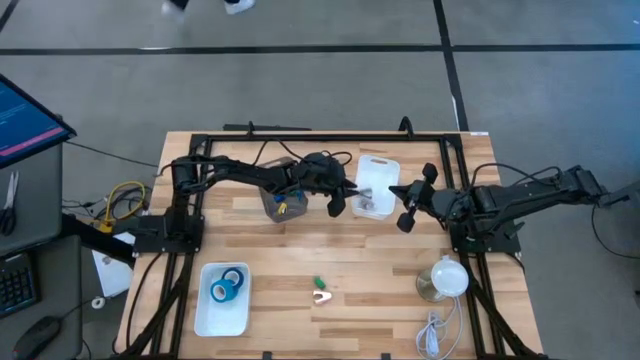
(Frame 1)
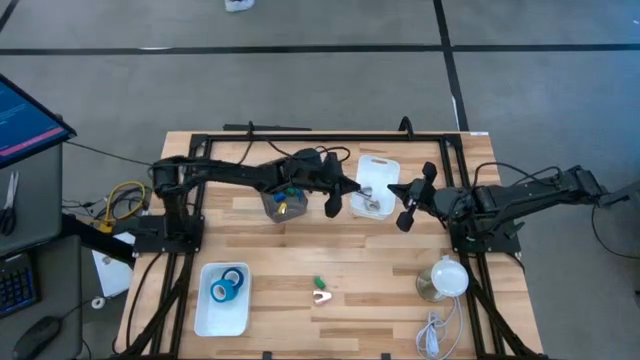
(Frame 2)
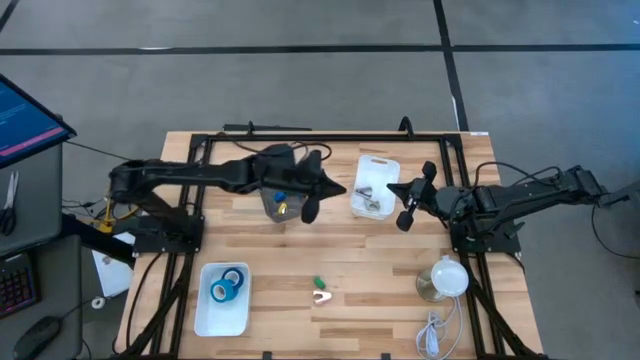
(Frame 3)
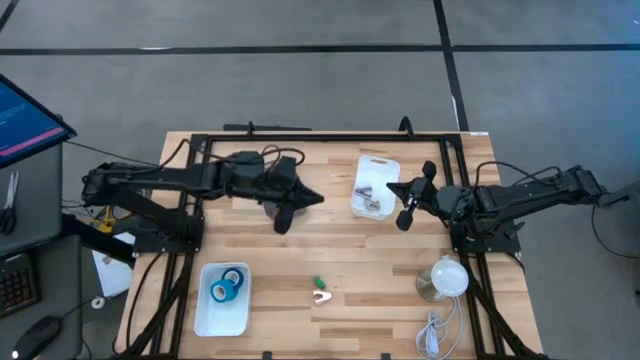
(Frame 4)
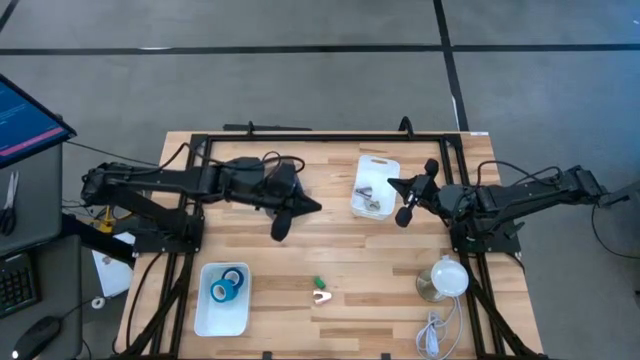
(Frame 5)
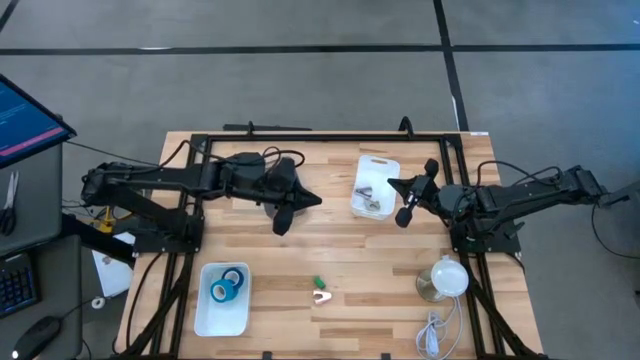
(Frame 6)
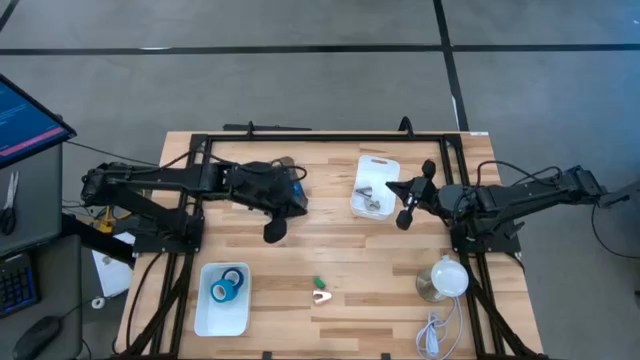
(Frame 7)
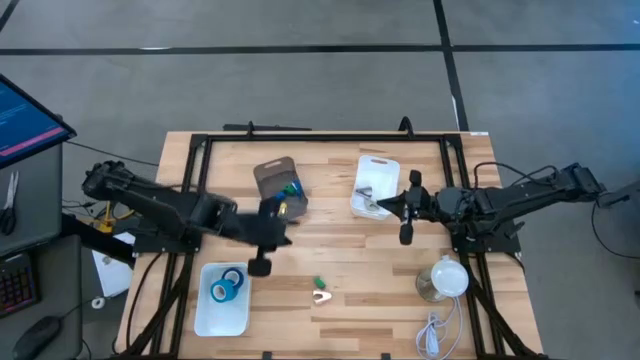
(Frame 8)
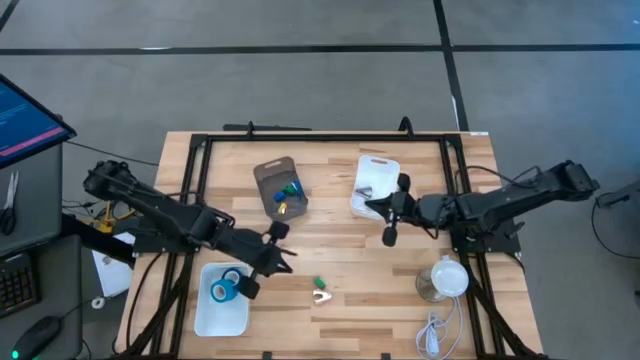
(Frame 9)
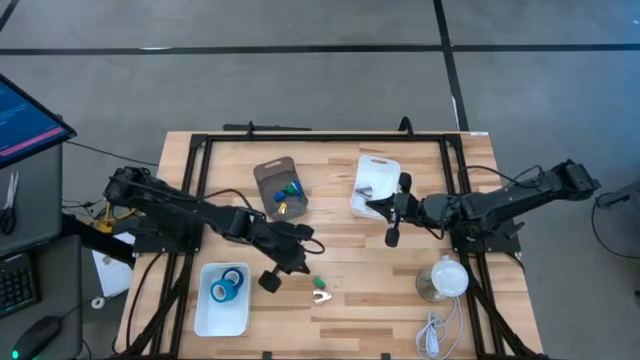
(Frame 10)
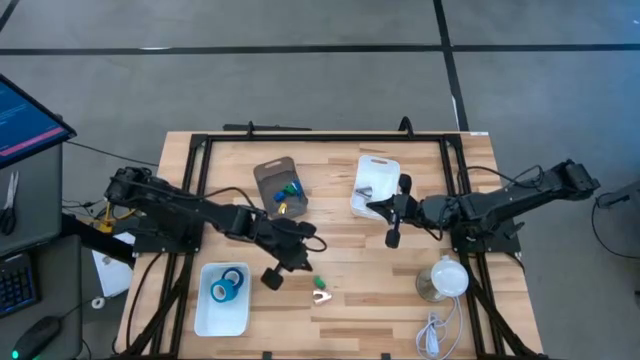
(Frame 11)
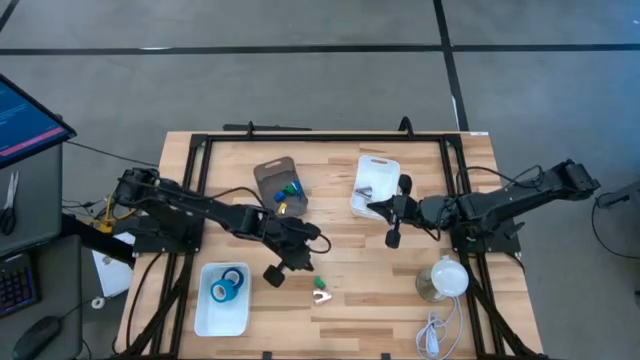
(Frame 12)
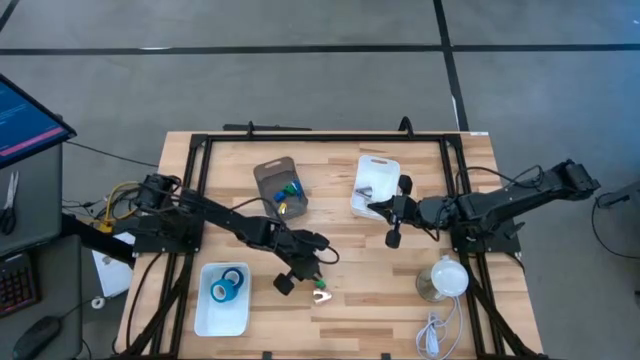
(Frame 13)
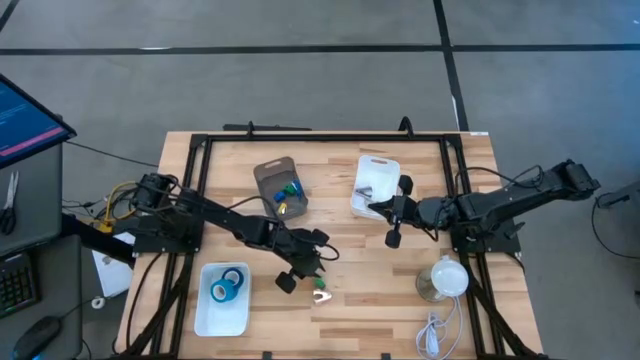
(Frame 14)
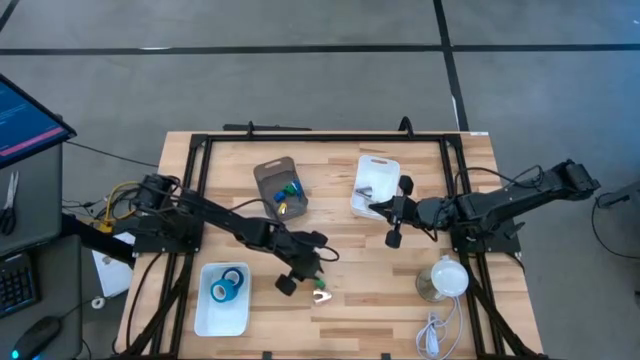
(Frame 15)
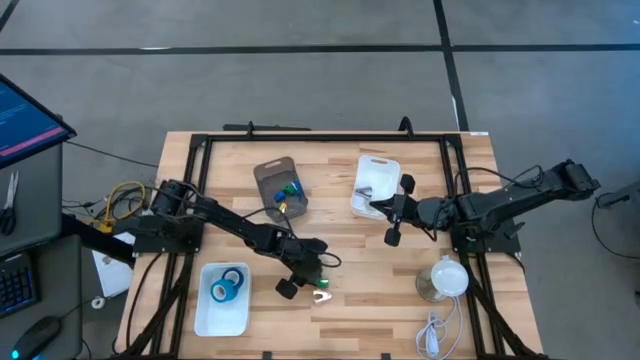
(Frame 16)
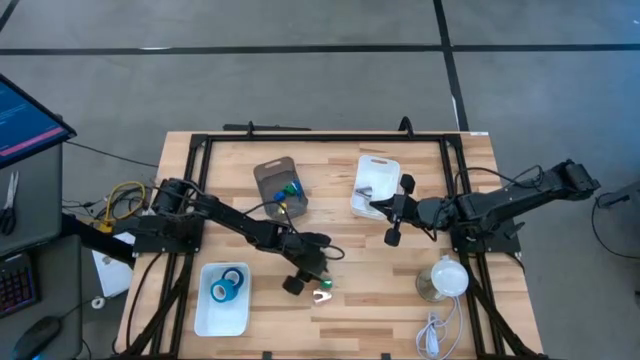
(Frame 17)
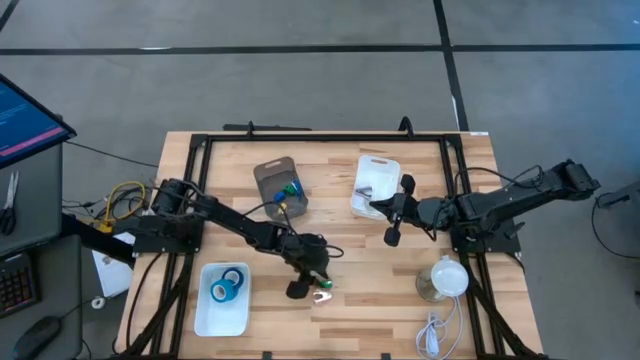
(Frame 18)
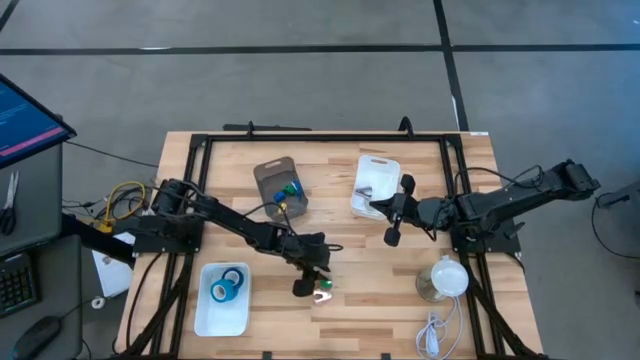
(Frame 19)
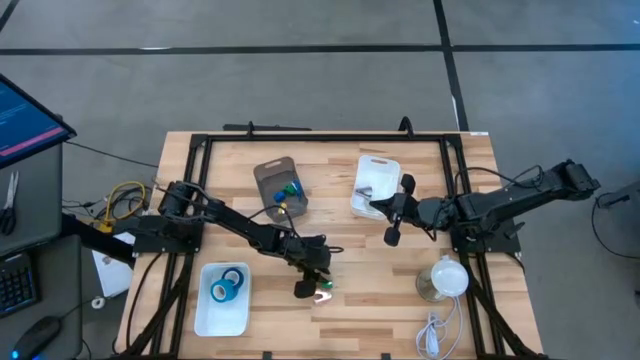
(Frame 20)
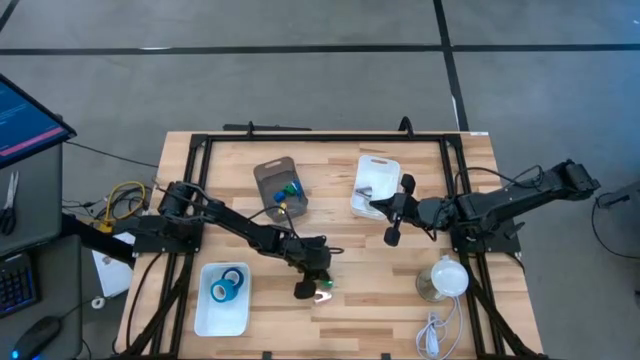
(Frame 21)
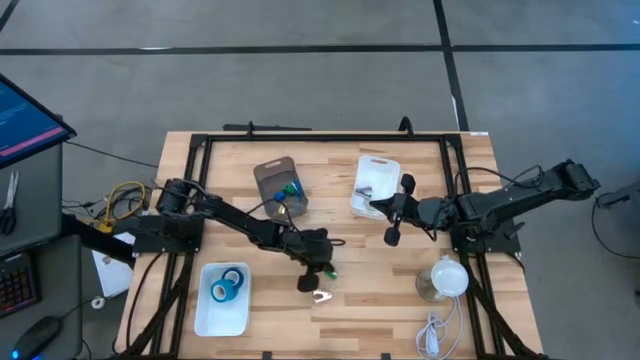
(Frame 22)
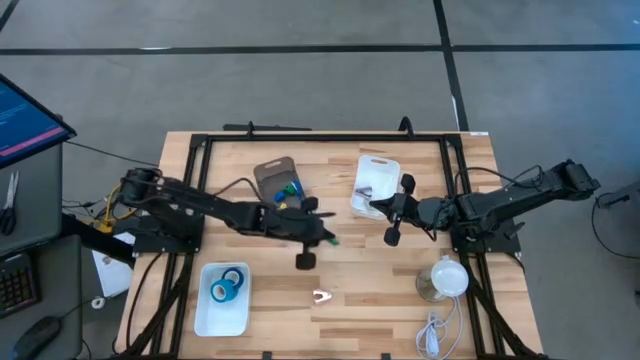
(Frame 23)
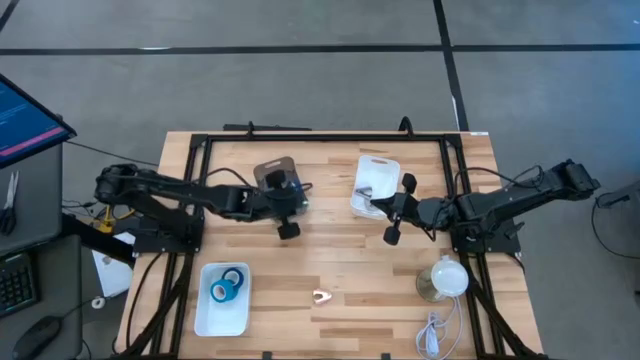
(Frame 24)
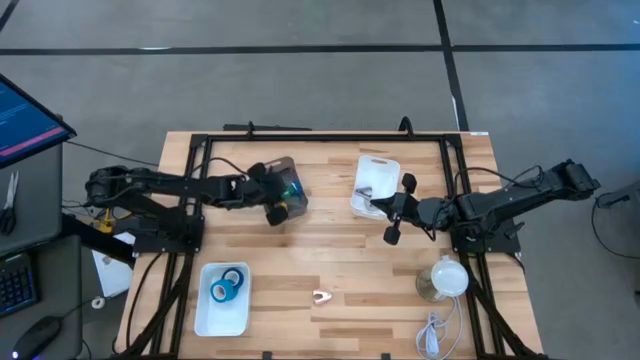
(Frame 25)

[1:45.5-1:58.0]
Task: Pick and place Stapler, Stapler remover, tape
Put the green stapler into the black bin

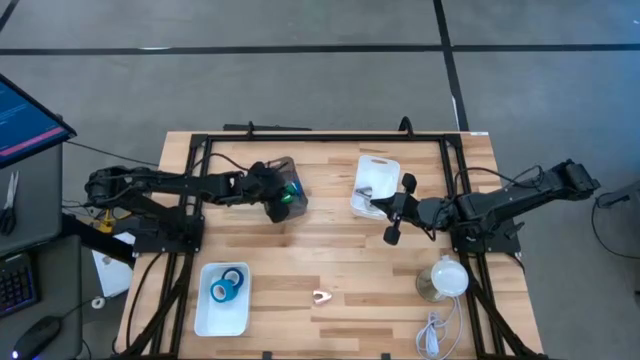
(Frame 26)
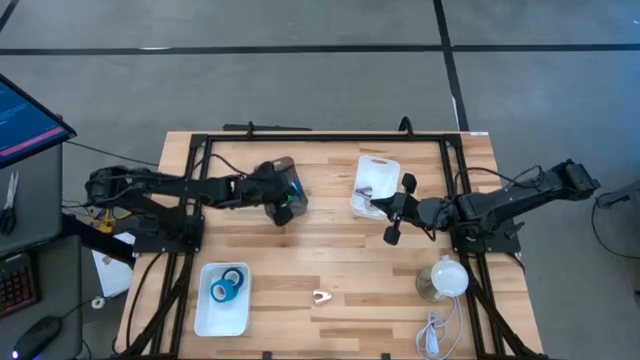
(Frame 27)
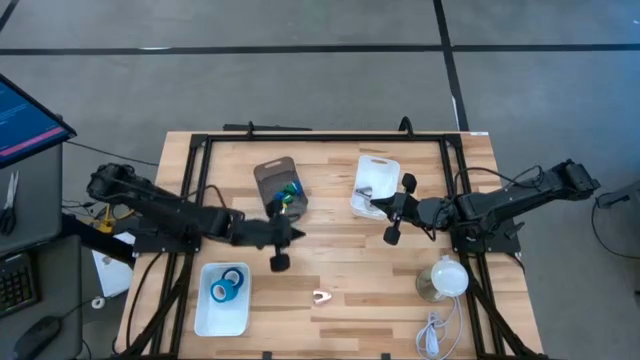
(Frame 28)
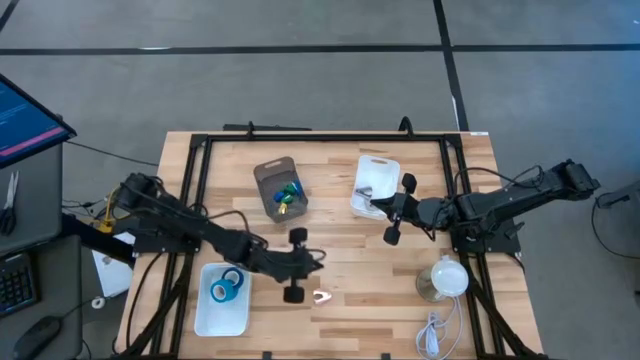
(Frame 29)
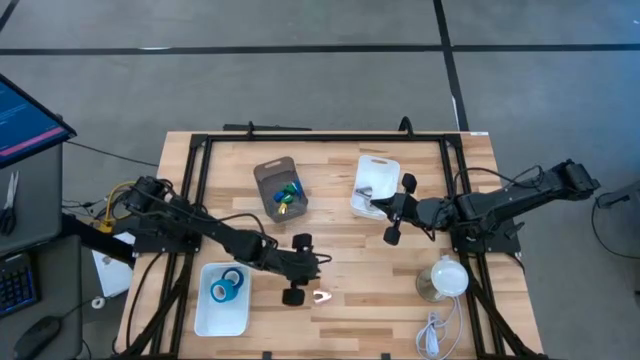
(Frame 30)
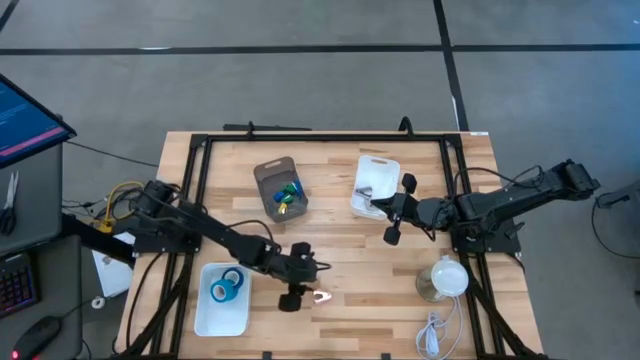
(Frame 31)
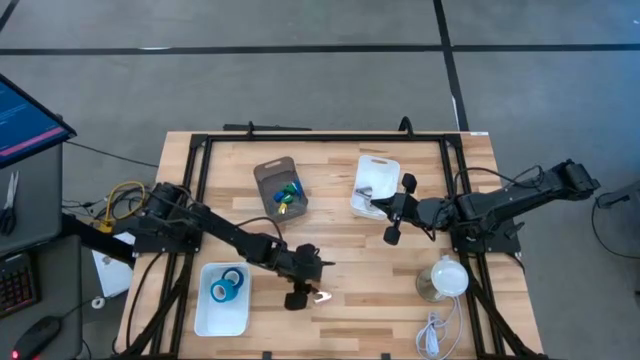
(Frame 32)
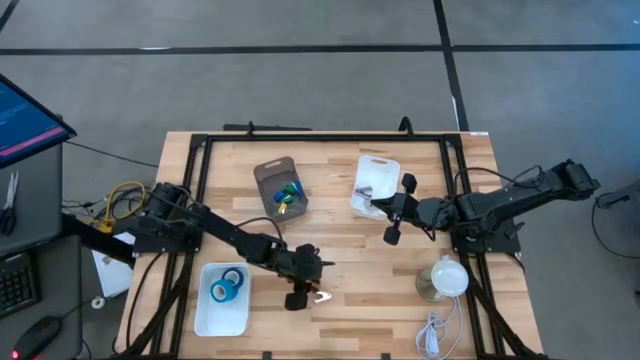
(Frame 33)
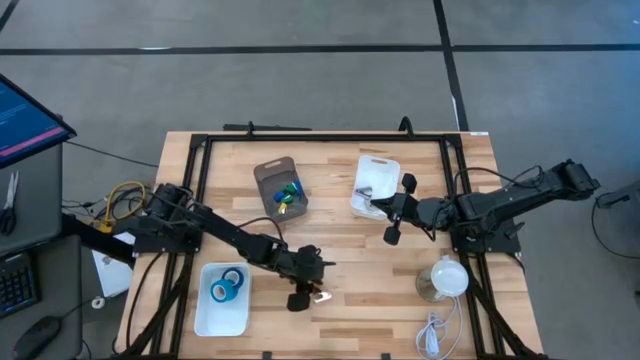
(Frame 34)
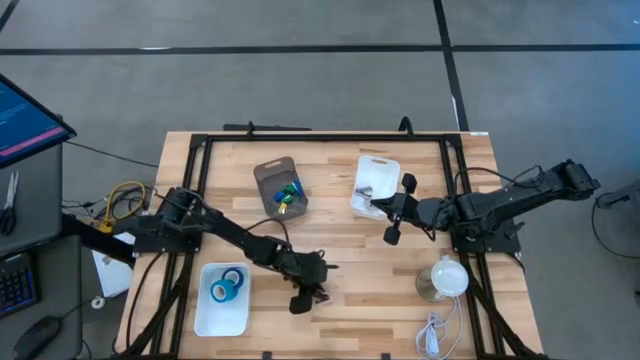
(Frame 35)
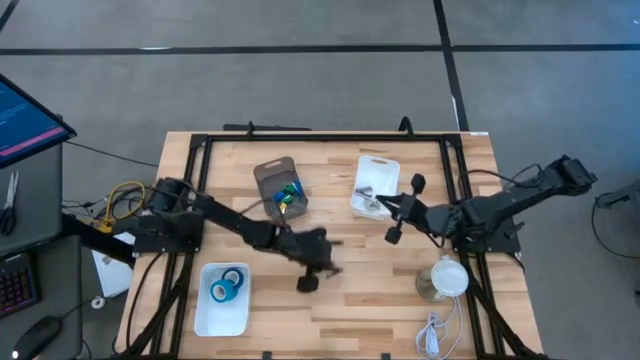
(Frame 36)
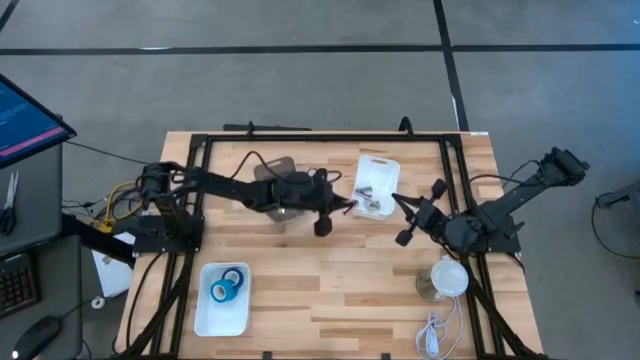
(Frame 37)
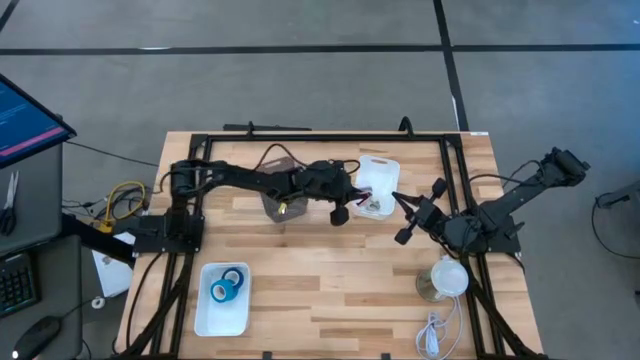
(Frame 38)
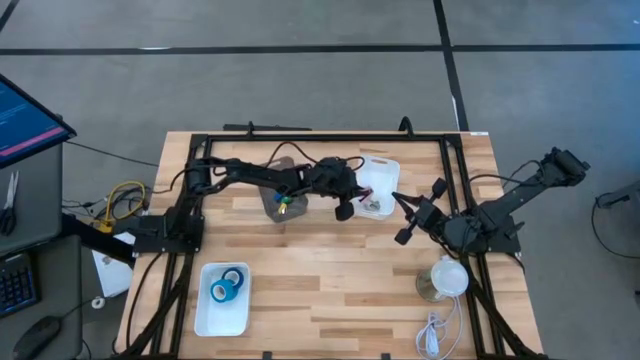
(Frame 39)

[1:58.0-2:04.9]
Put the pink stapler remover into the top white bin

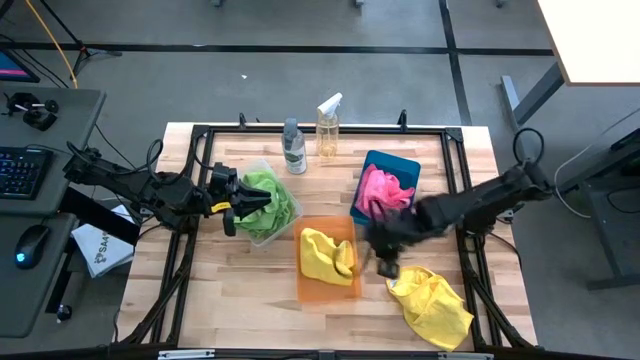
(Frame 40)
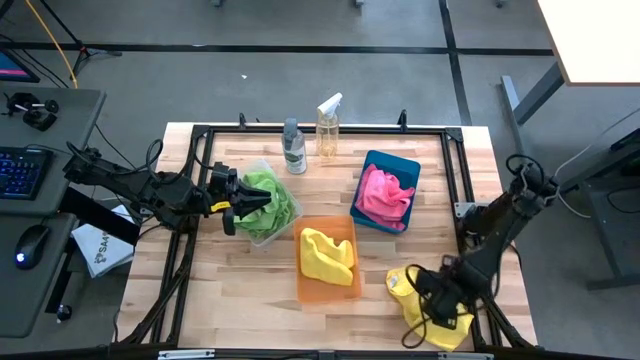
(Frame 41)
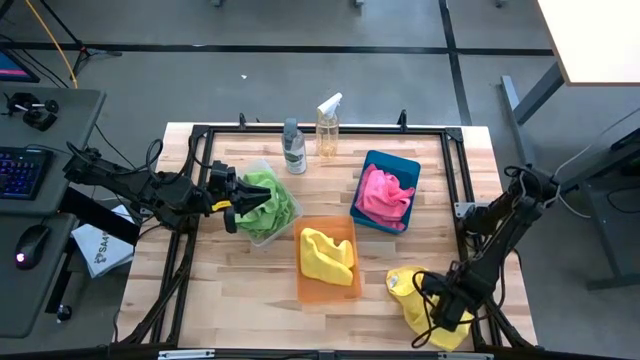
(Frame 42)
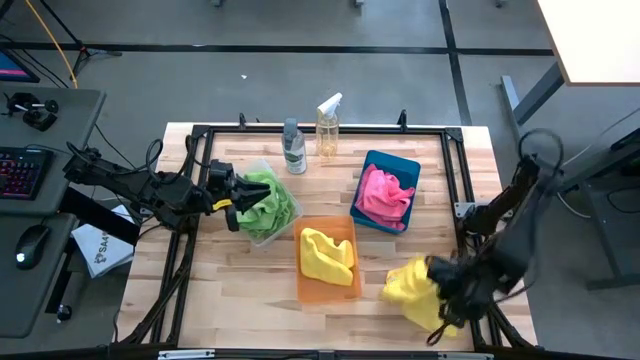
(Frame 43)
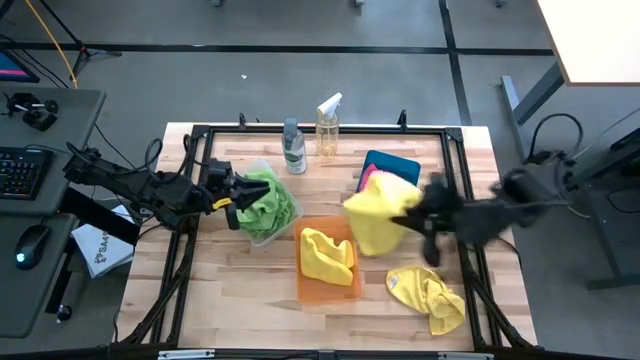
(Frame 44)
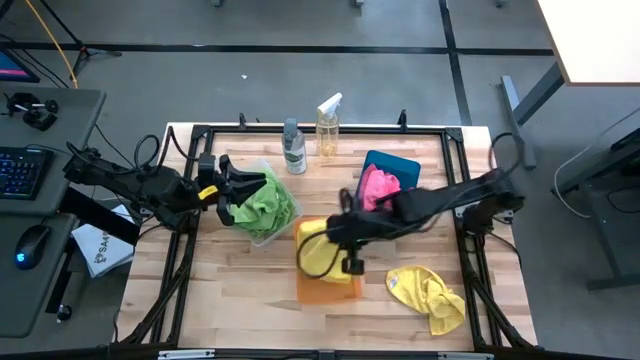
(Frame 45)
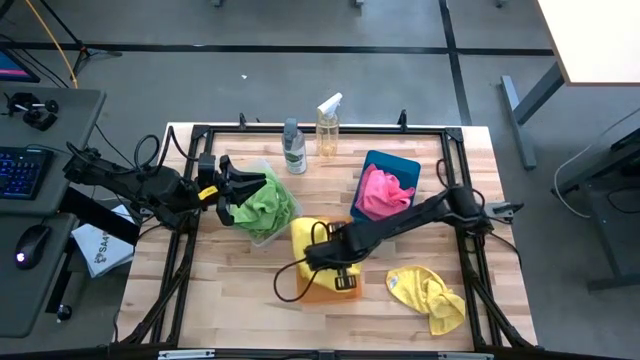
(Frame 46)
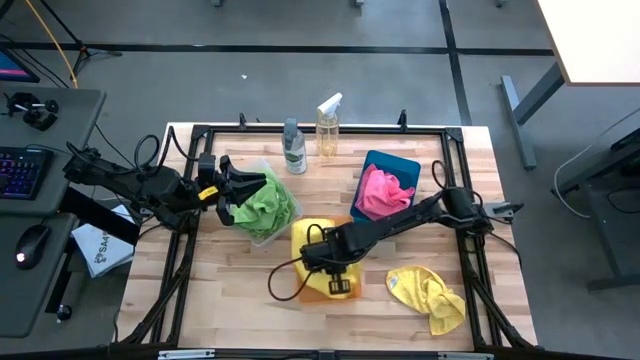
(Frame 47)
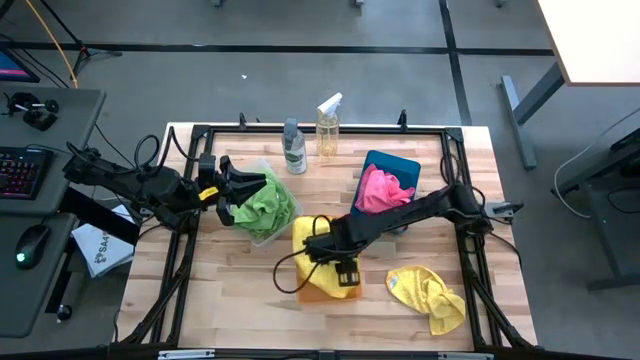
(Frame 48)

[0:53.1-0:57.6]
Task: Sort microfiber towel by color & place in baskets
Put the yellow microfiber towel into the orange bin
